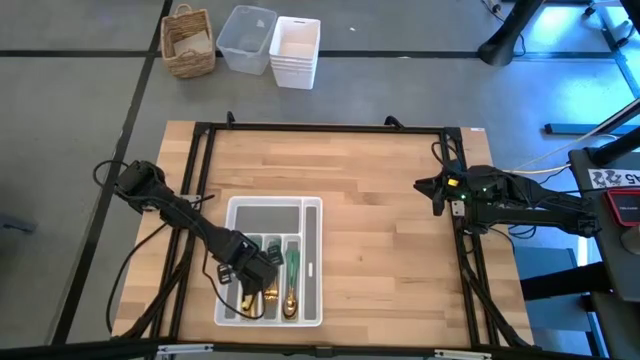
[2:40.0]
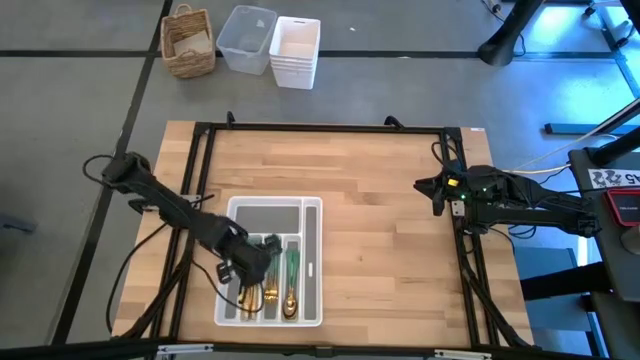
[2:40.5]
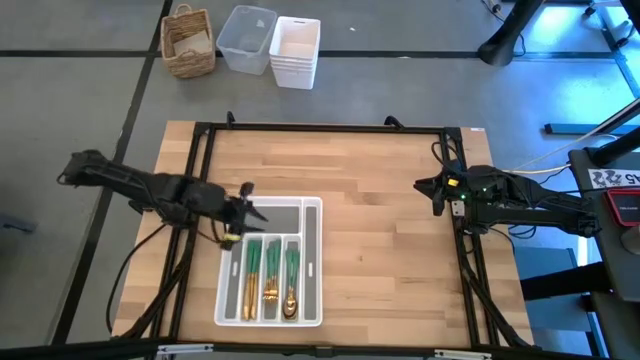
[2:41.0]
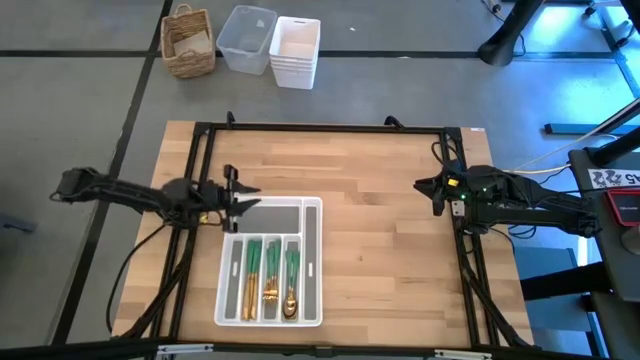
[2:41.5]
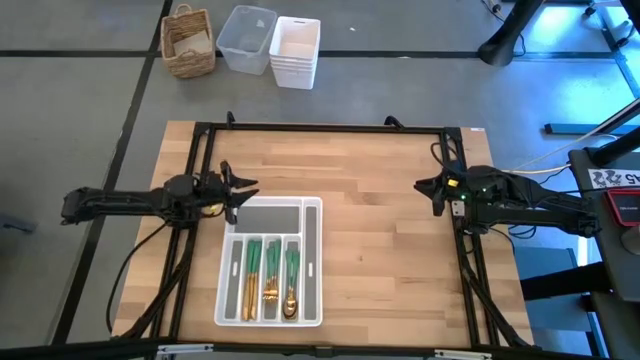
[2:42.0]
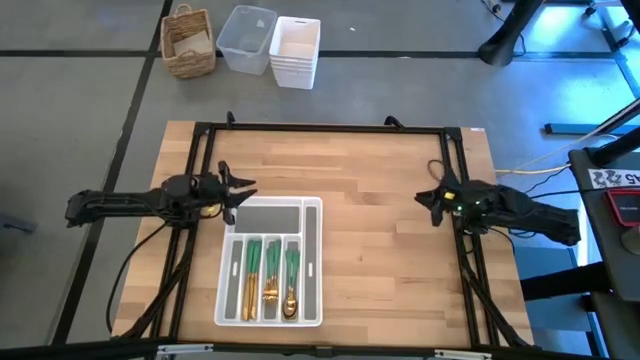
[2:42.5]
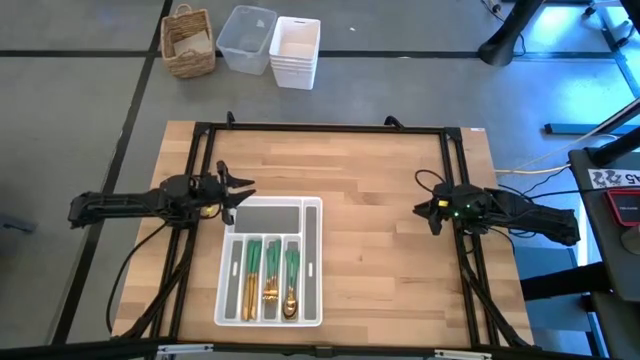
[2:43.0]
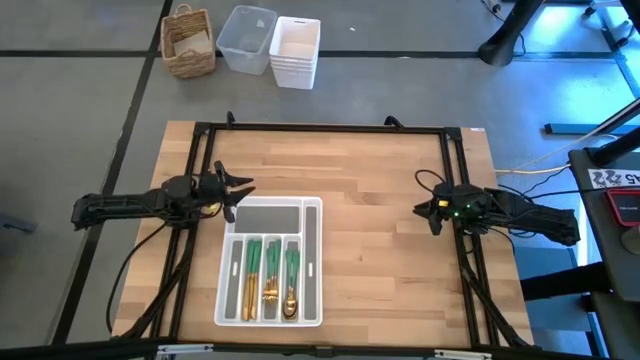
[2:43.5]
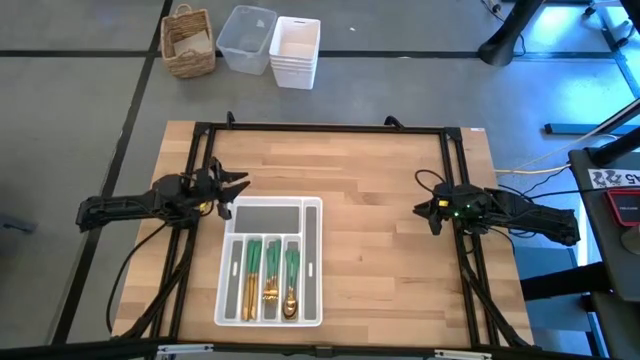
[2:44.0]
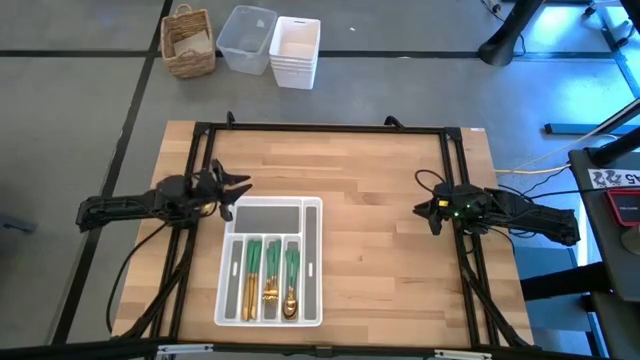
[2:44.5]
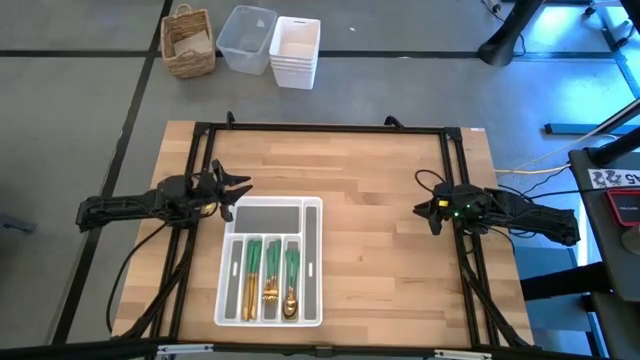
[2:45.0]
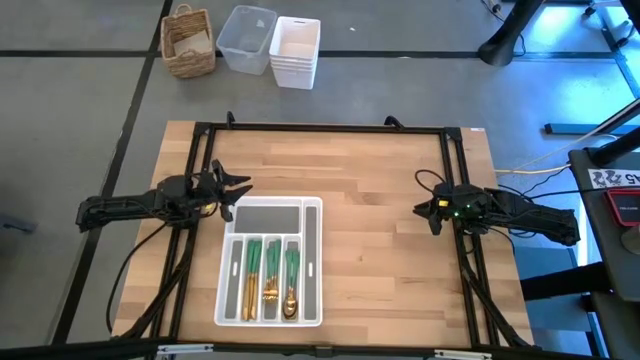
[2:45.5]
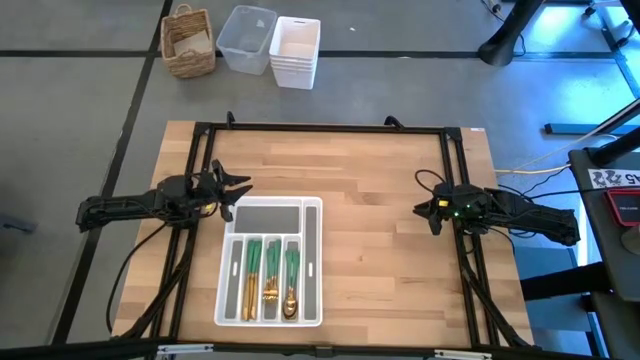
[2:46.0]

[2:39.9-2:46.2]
Task: Sort silverware
Return to Home Position

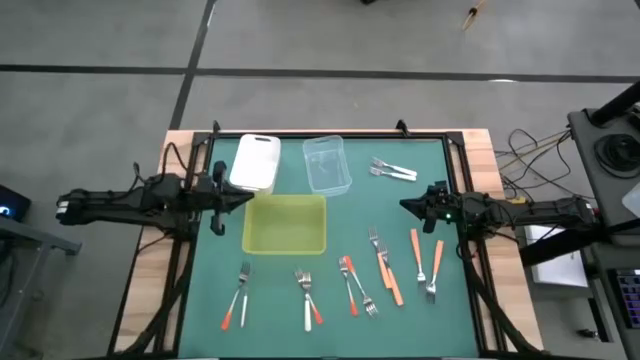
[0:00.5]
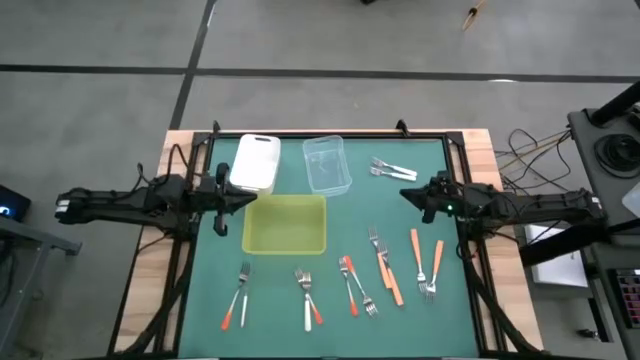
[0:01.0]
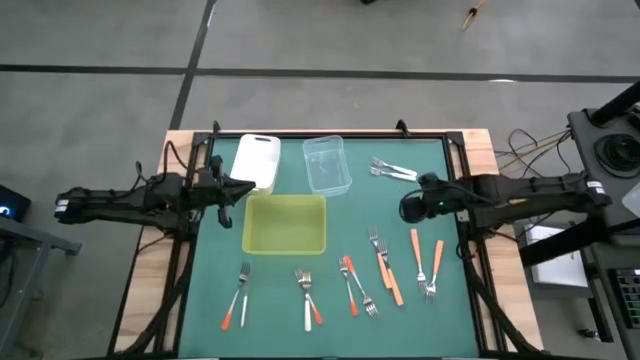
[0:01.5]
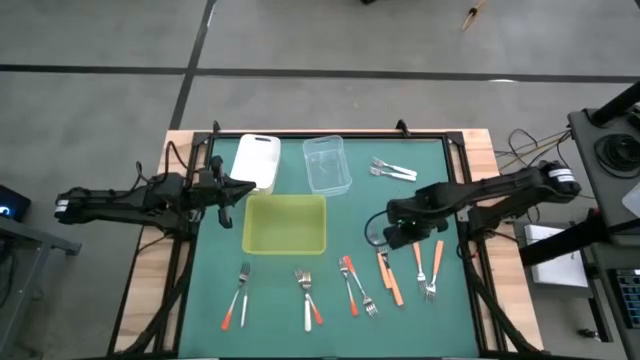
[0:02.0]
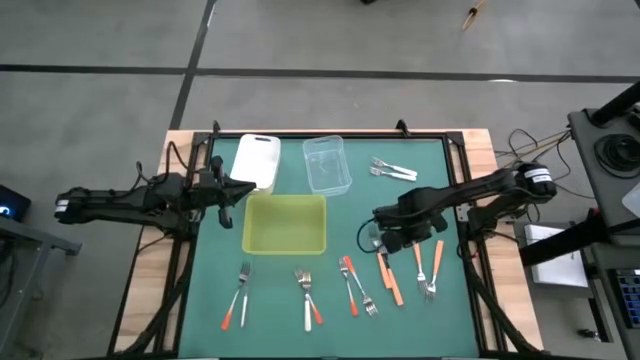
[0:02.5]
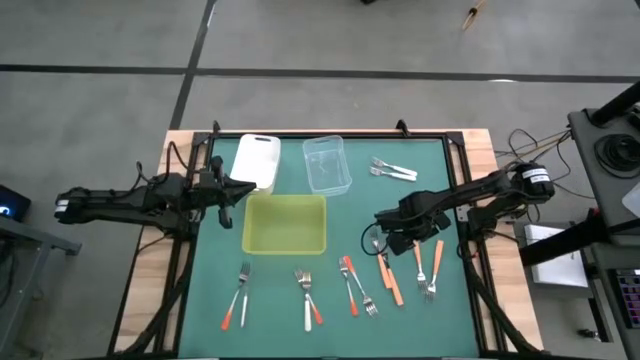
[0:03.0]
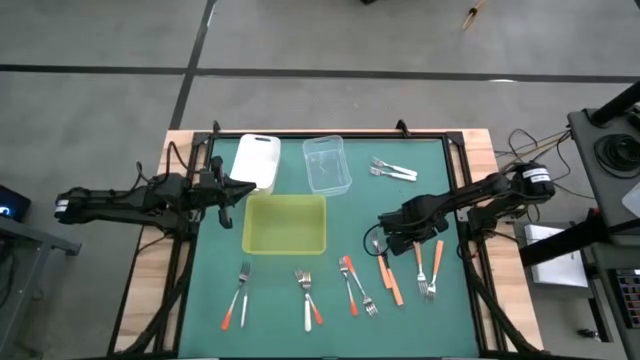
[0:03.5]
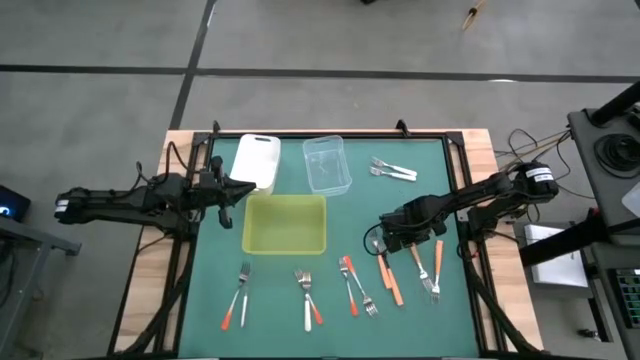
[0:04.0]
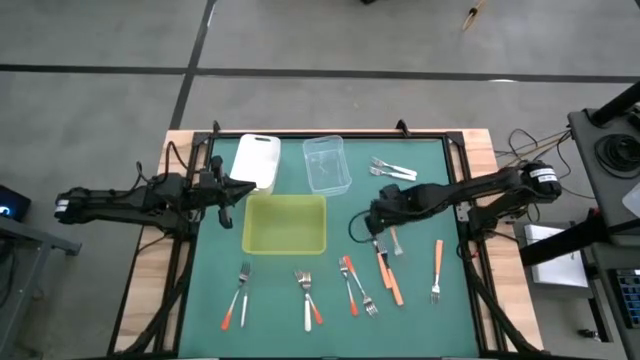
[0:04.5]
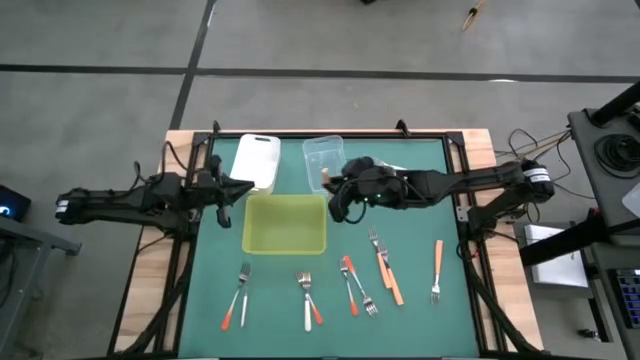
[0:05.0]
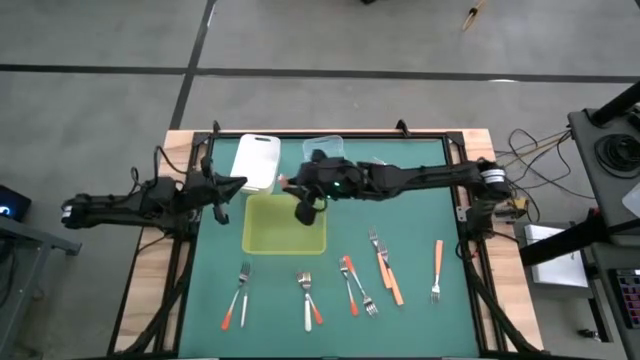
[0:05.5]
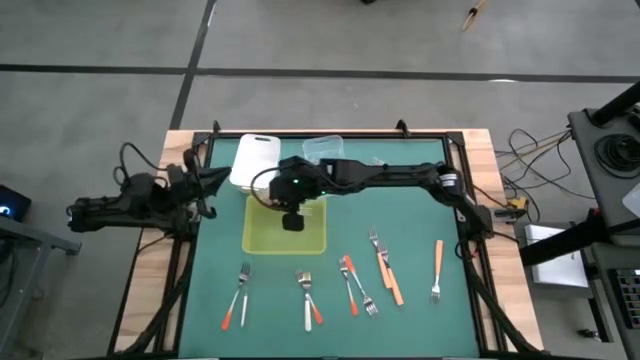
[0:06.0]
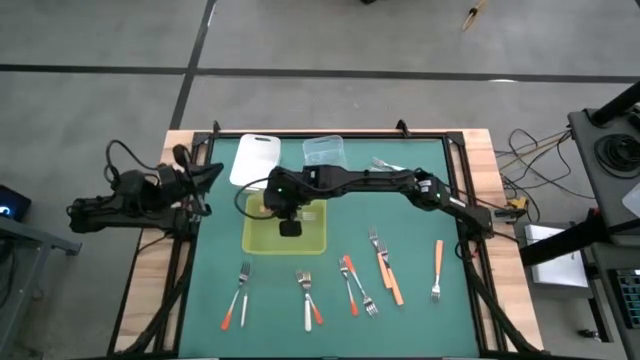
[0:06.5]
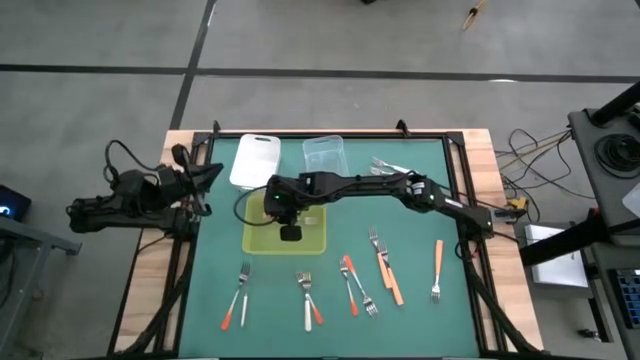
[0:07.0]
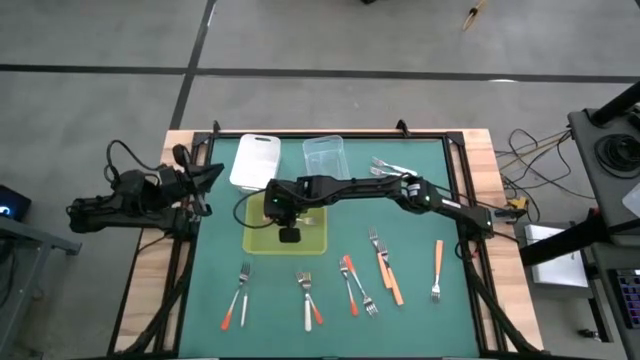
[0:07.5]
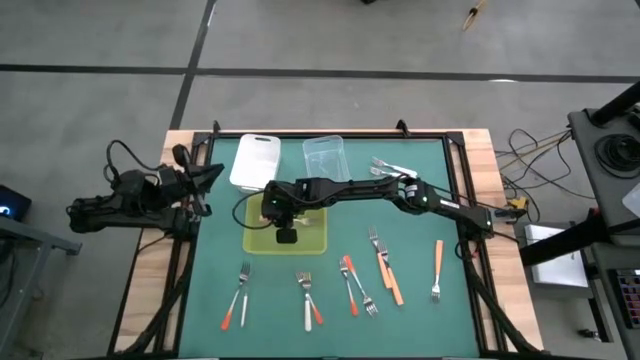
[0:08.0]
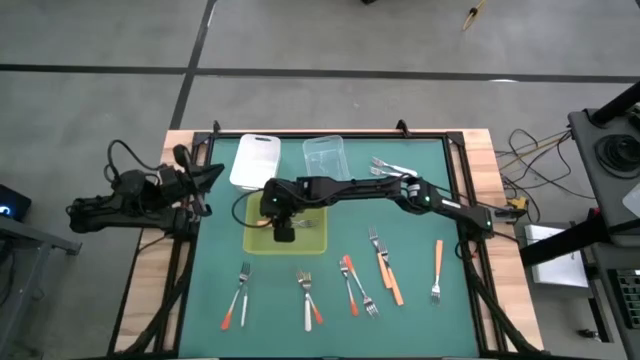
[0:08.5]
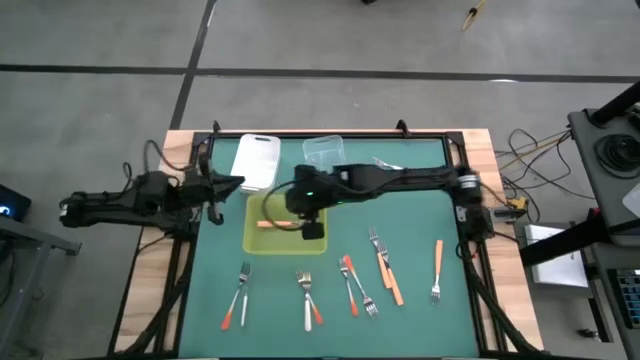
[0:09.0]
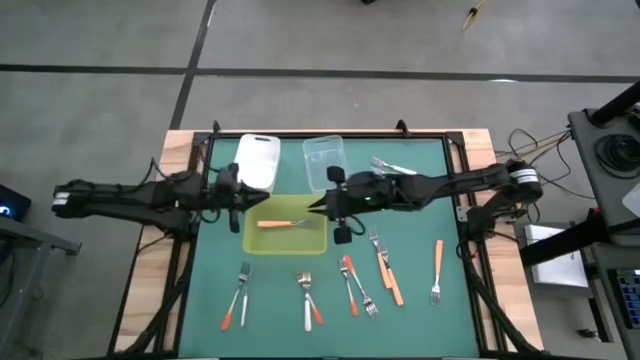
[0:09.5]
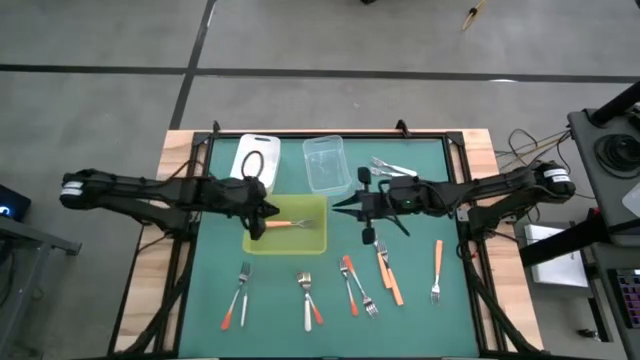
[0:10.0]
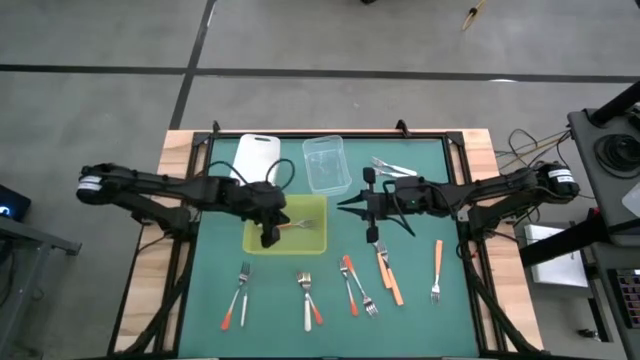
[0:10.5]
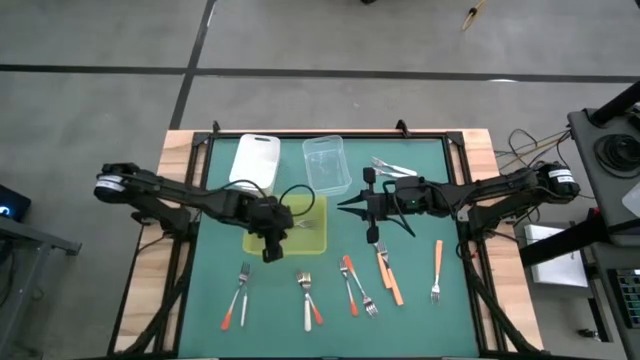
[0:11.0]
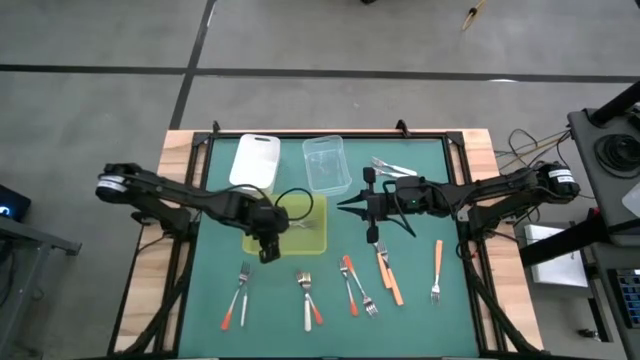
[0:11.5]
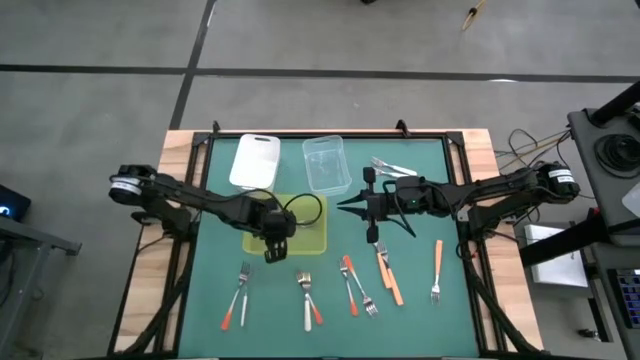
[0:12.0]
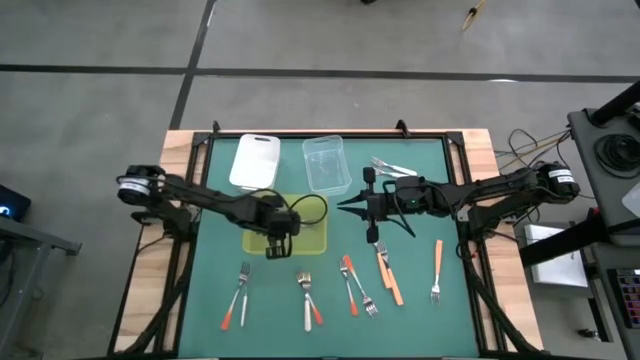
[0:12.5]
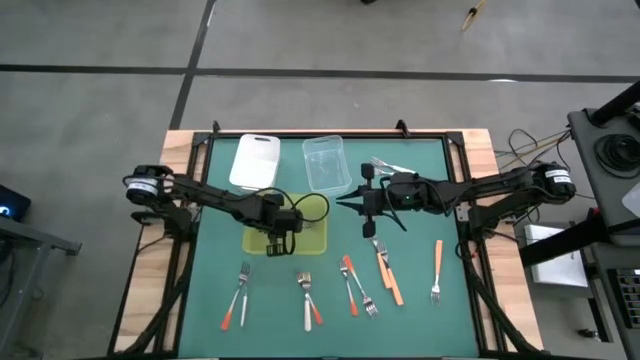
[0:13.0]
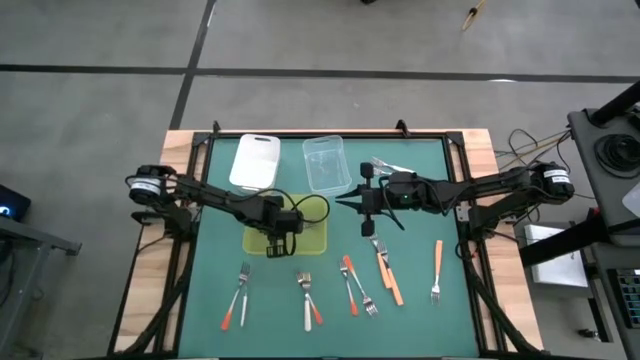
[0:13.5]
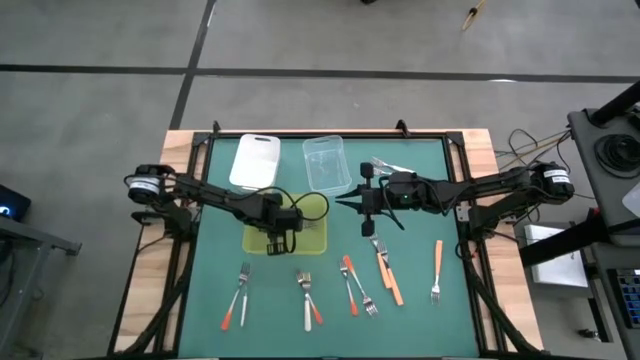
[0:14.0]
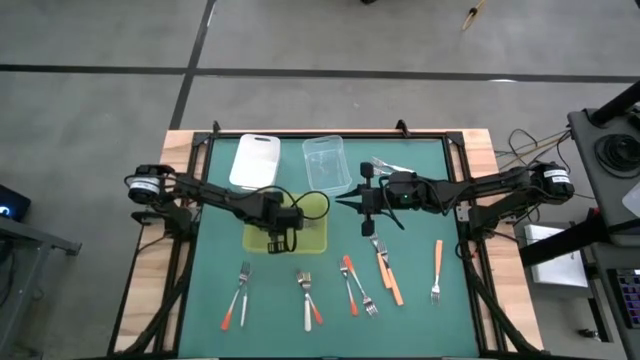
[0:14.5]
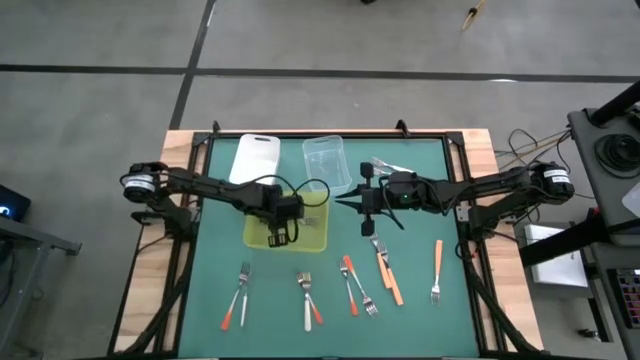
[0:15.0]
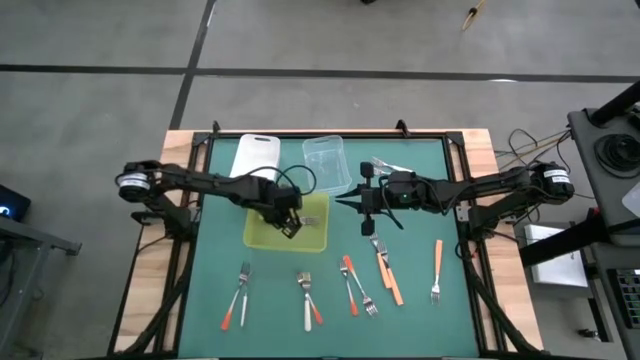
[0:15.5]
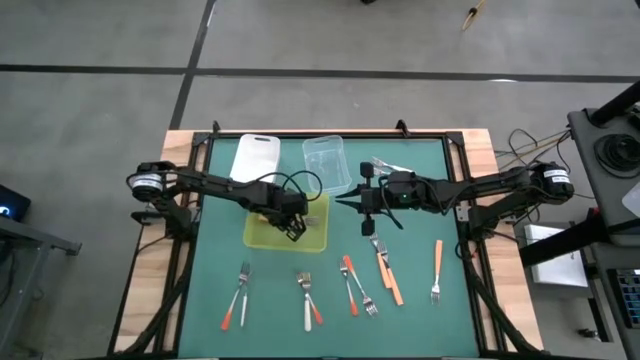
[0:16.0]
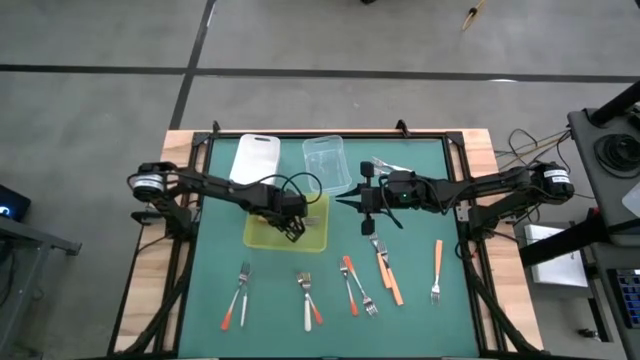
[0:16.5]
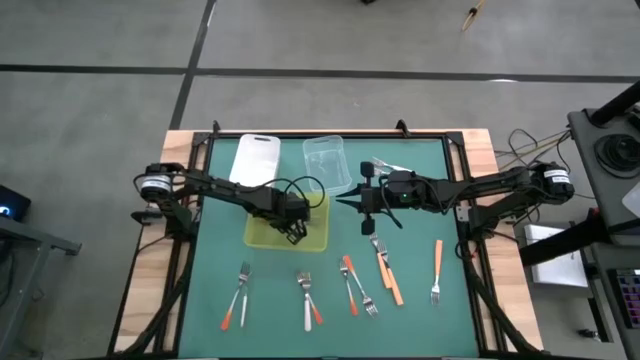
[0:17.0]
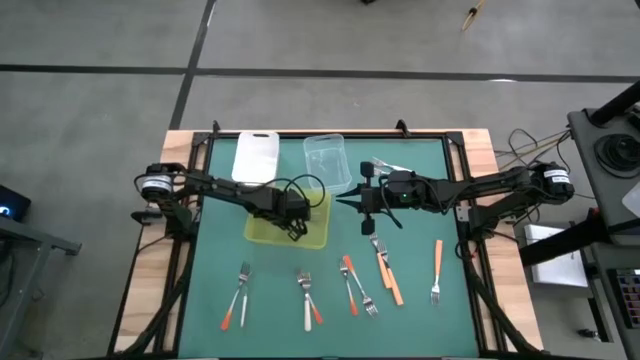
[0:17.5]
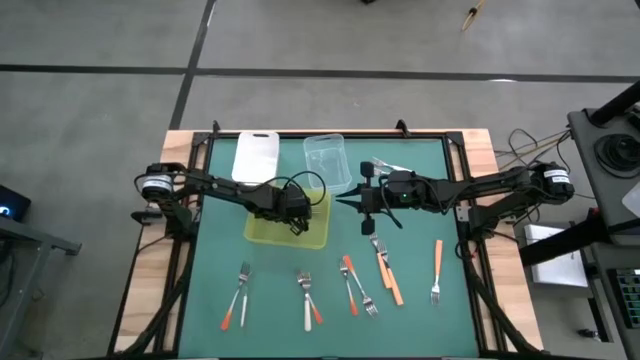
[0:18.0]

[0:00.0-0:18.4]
Task: Sort silverware by color (type)
Put the yellow fork into the yellow bin
